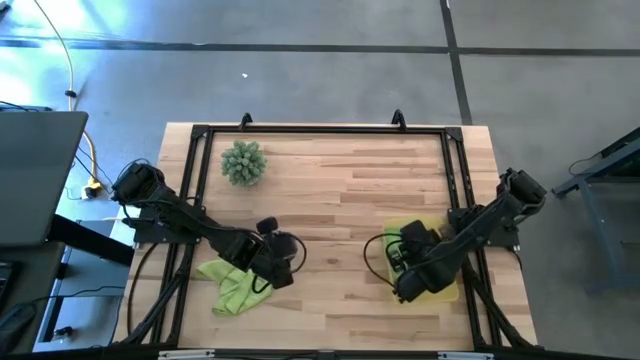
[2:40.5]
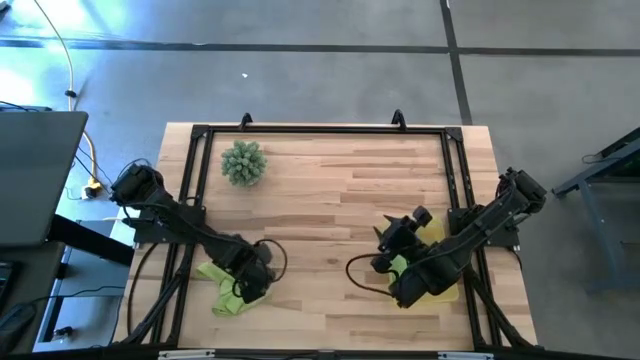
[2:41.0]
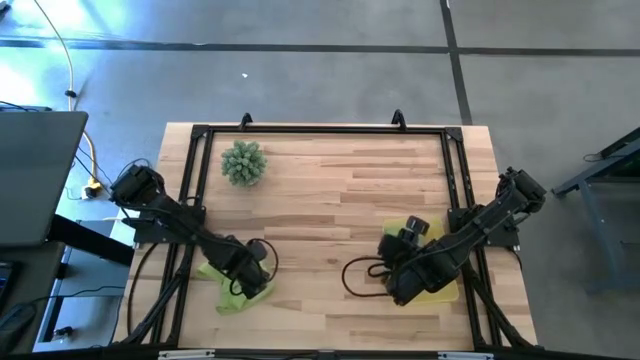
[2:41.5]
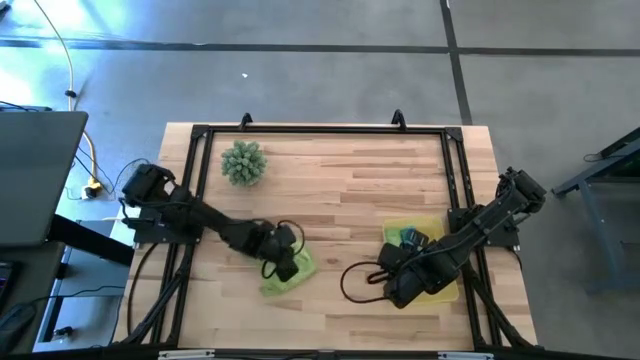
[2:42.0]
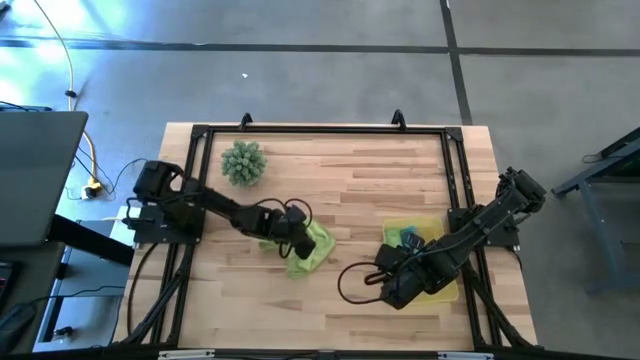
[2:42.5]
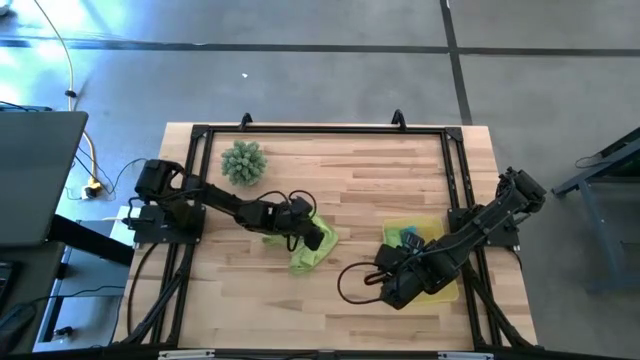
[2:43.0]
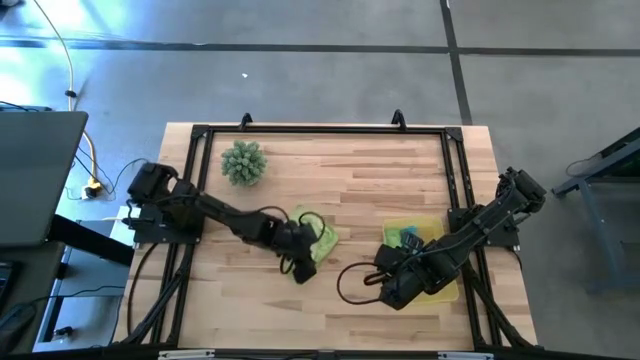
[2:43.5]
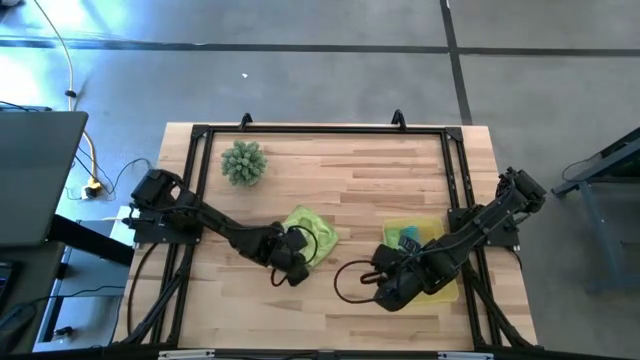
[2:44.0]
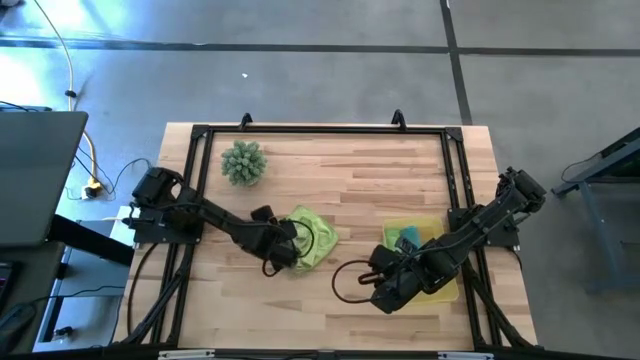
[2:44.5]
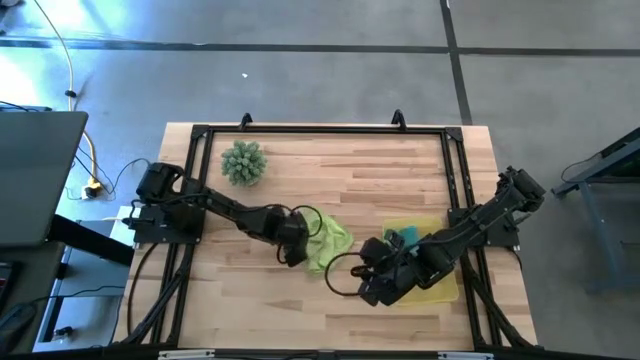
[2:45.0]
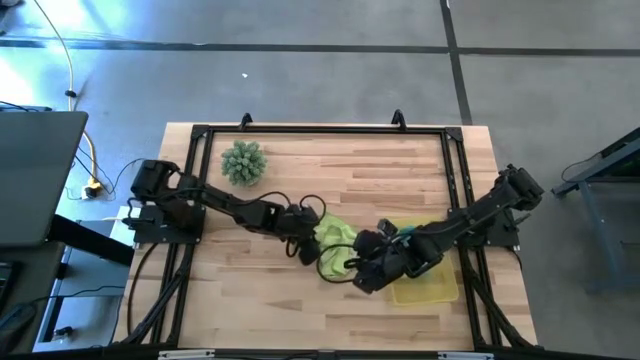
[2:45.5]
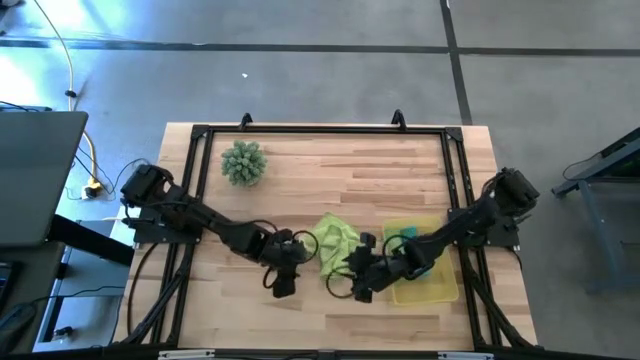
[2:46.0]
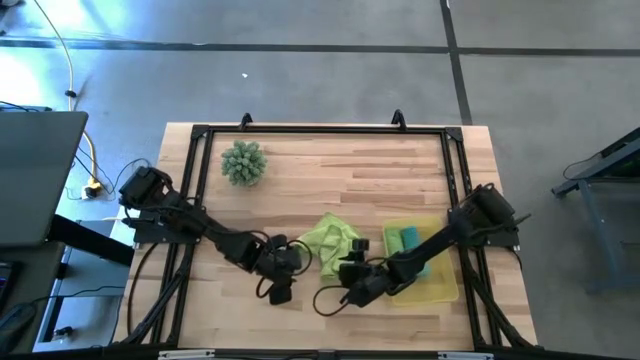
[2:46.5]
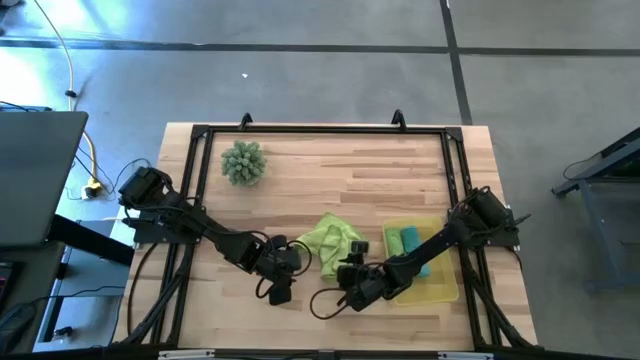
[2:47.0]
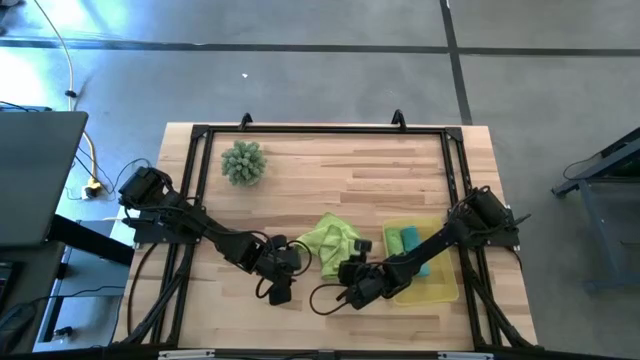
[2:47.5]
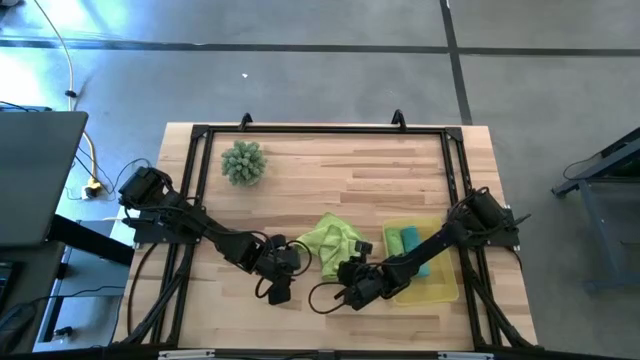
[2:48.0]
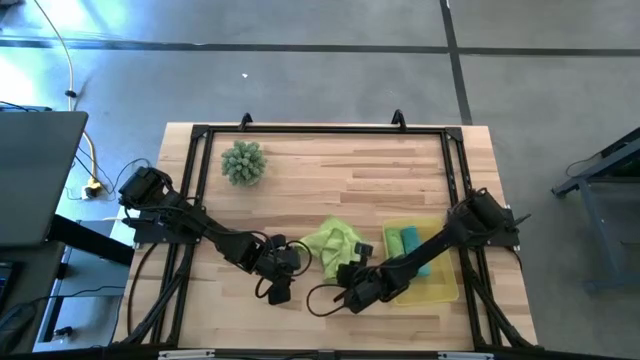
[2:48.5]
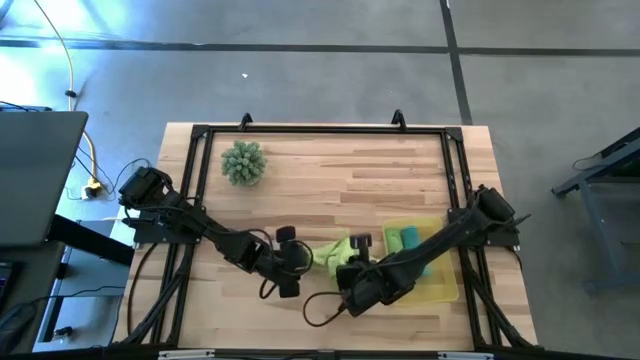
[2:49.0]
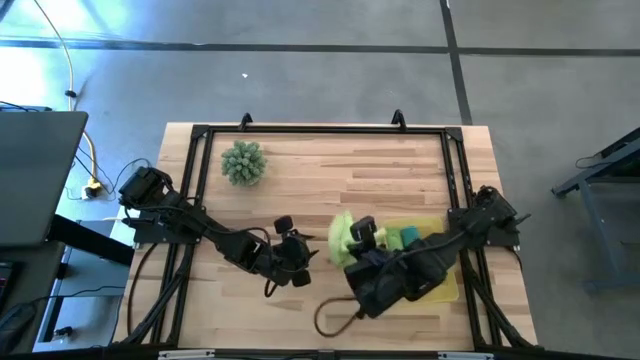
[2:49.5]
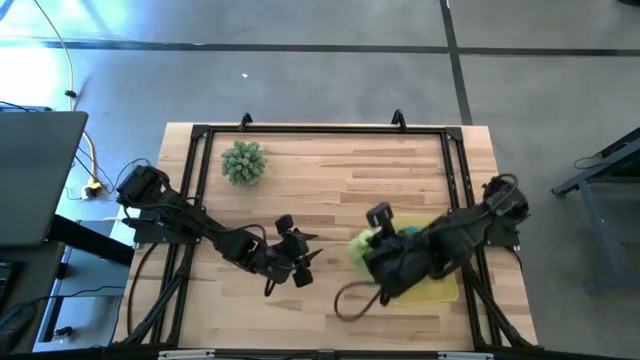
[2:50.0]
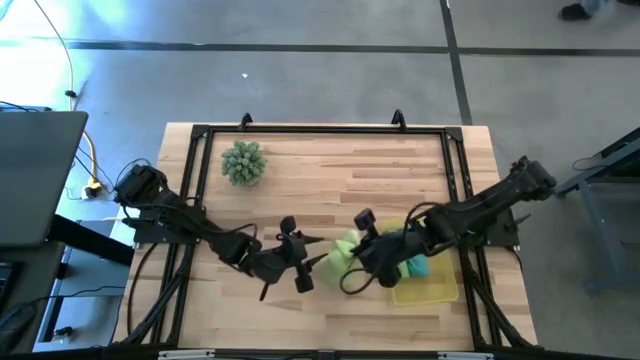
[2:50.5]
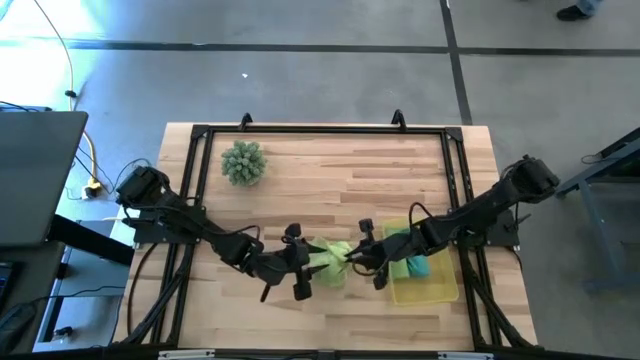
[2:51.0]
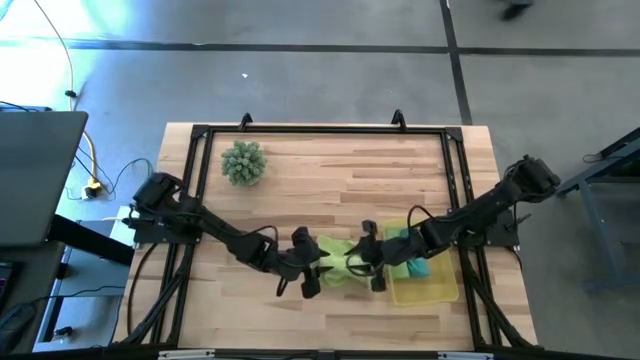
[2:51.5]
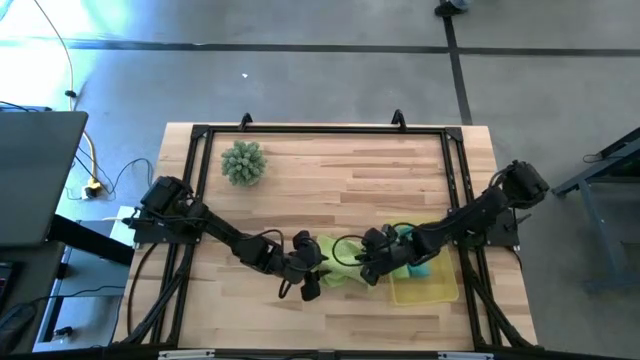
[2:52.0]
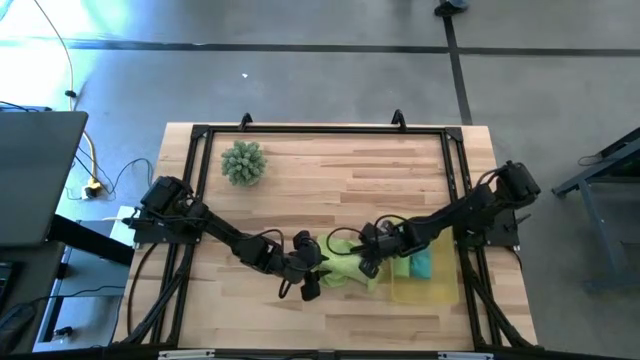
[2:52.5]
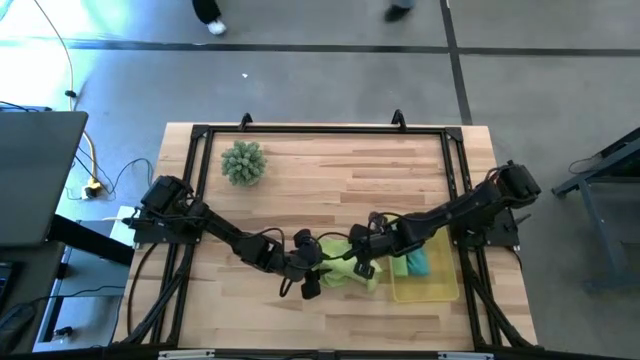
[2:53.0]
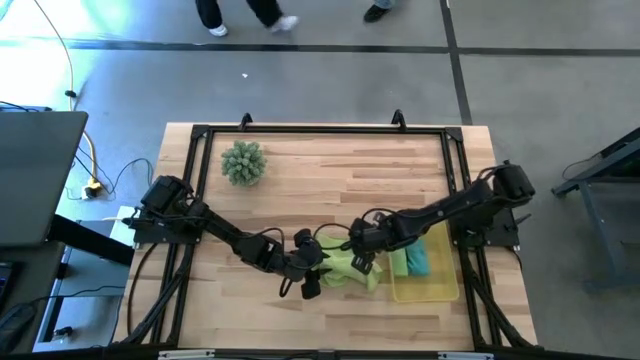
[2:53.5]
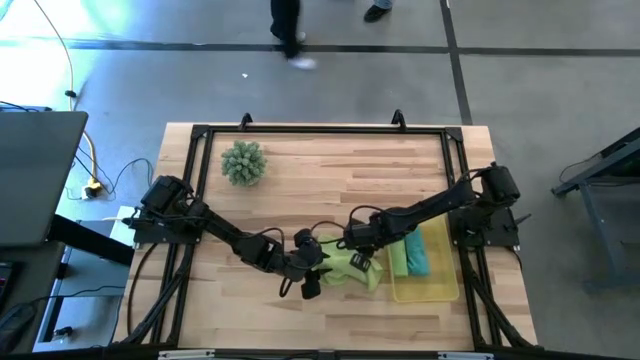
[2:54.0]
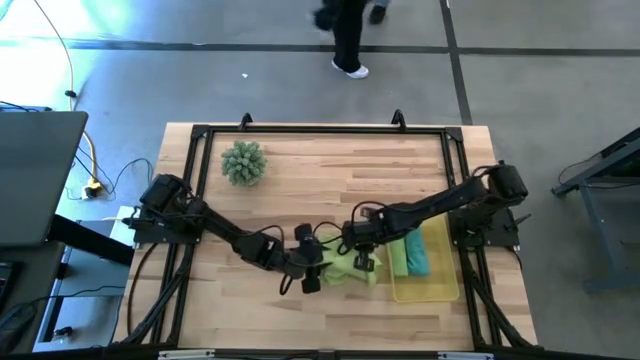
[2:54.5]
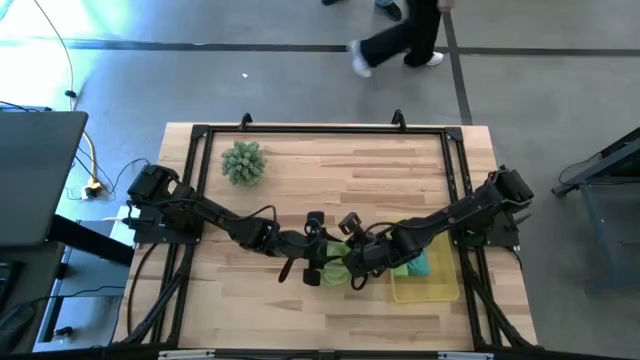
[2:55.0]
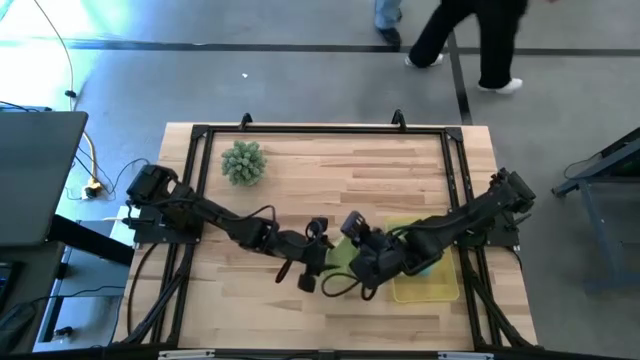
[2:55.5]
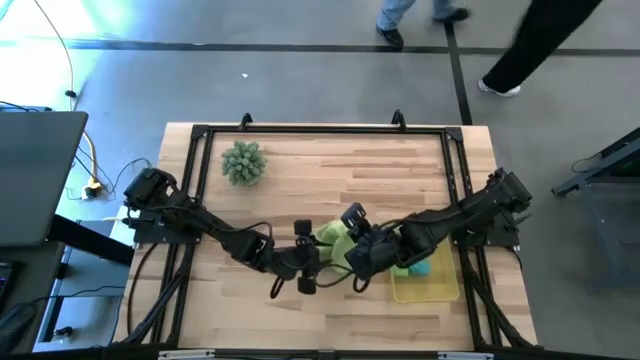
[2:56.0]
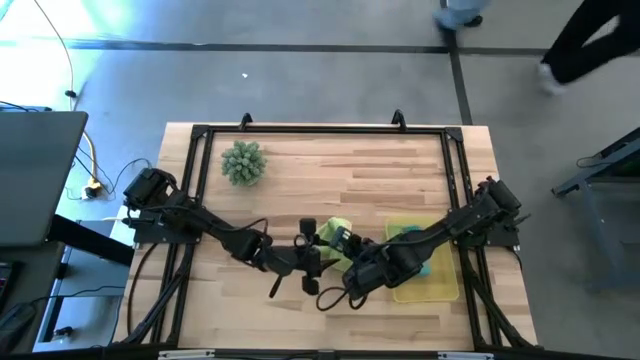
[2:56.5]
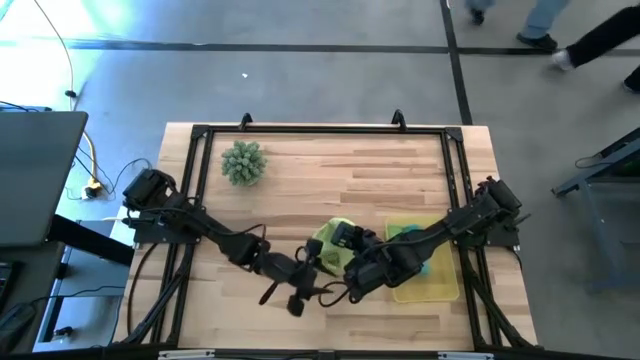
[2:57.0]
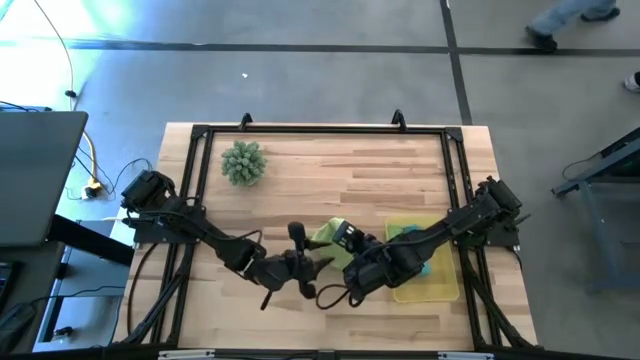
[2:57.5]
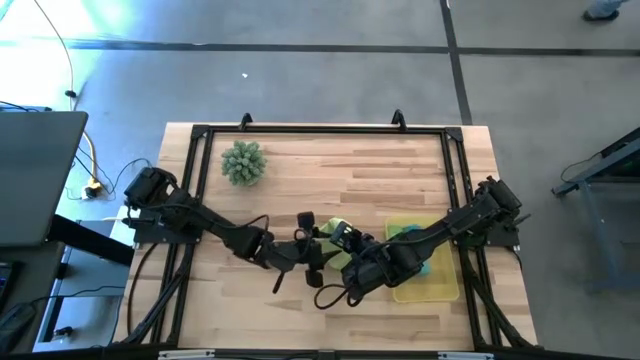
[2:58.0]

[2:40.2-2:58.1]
Task: Roll microfiber towels into tight, uniform cylinder then place into a basket
Fold the light green cloth

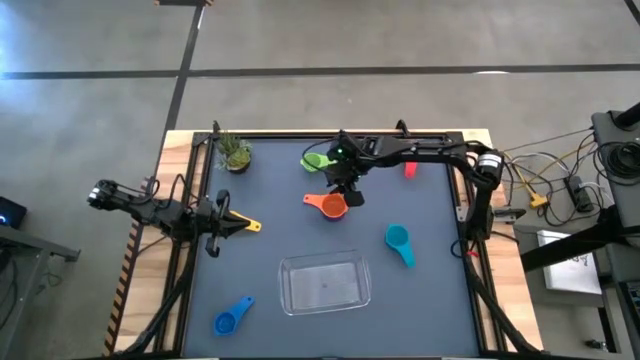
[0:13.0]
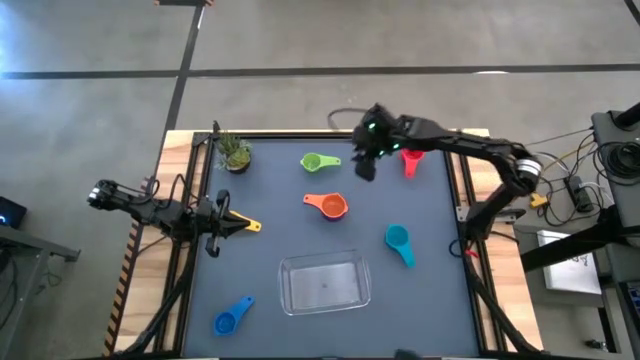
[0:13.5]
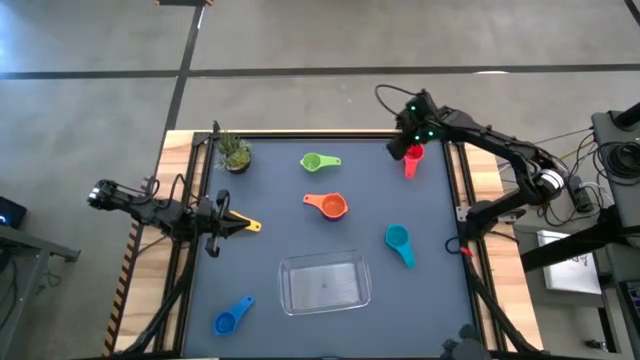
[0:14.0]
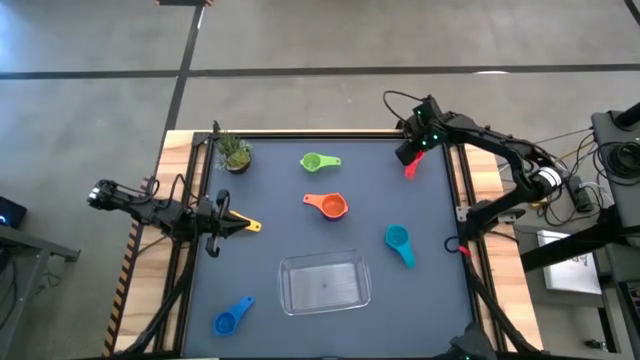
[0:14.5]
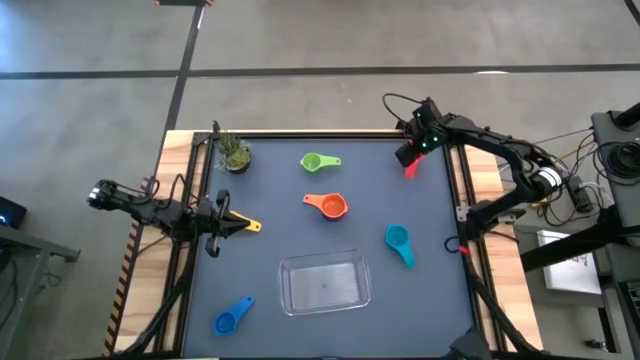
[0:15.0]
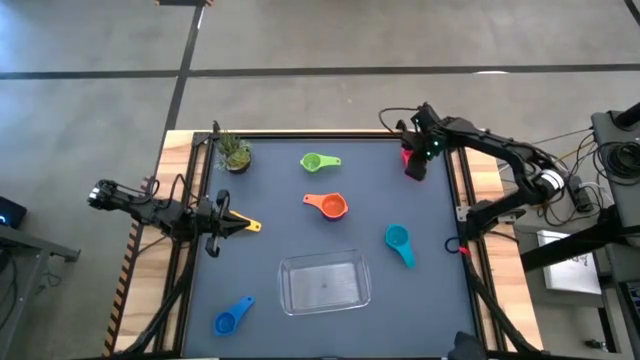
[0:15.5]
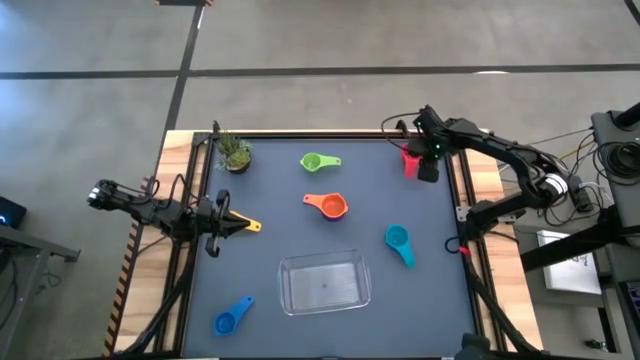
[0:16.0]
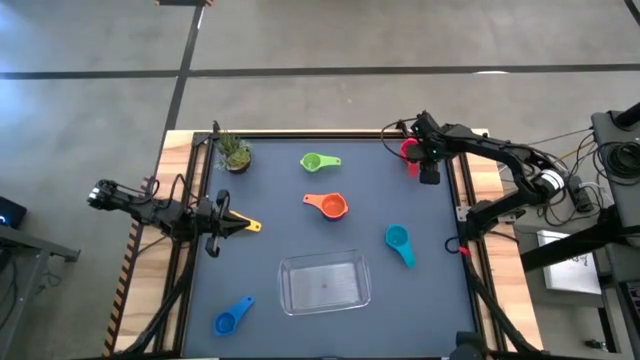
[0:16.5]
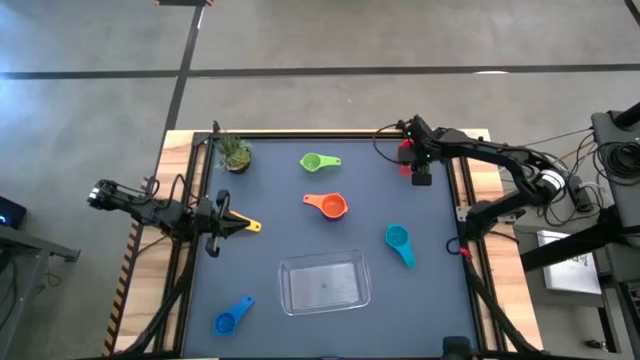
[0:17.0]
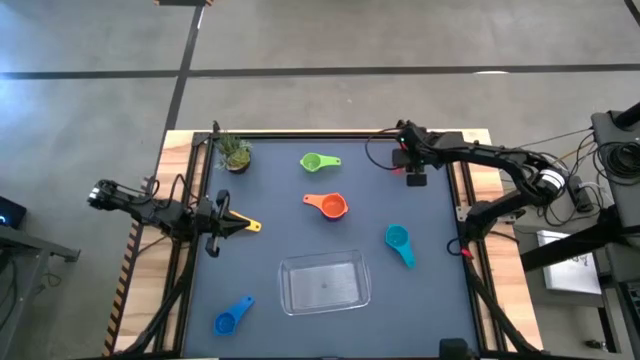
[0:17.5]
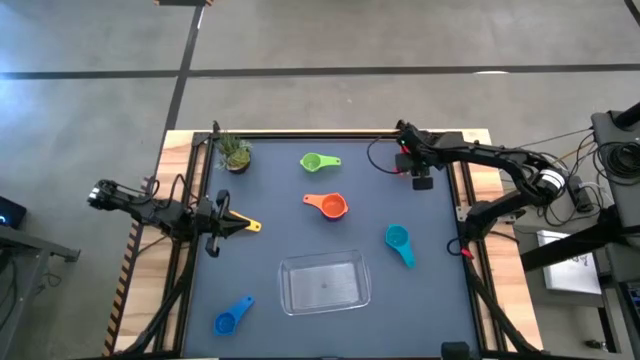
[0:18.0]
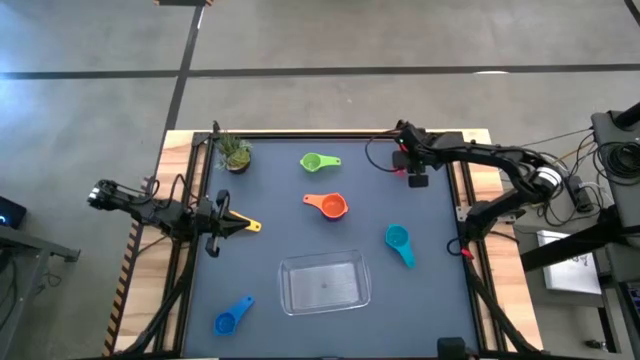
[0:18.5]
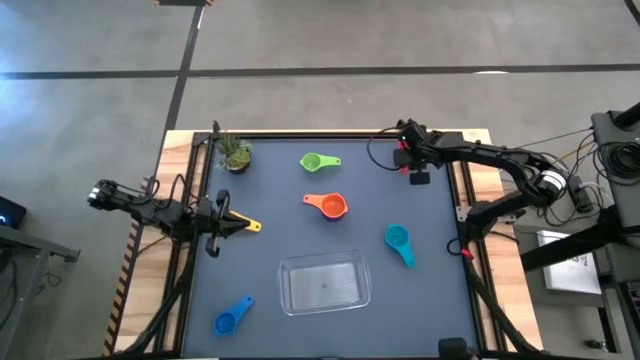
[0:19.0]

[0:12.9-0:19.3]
Task: Nest measuring cups in basket
Stack the red measuring cup on top of the orange measuring cup
